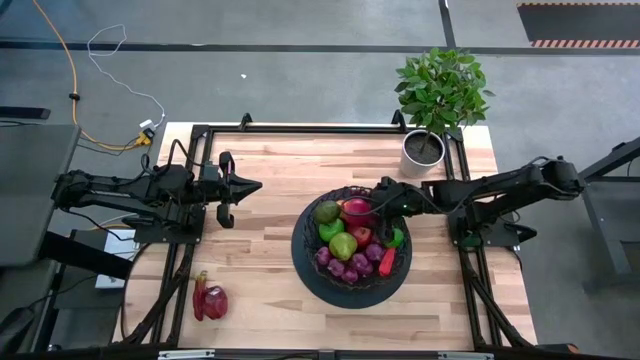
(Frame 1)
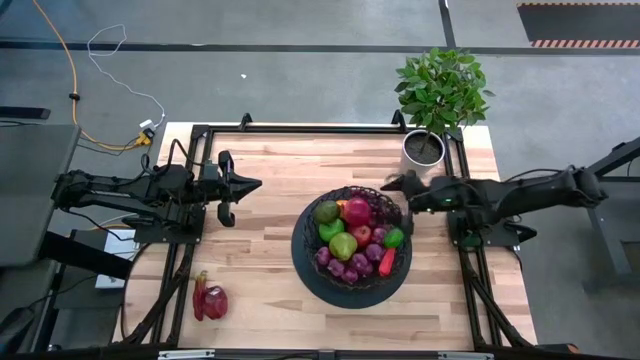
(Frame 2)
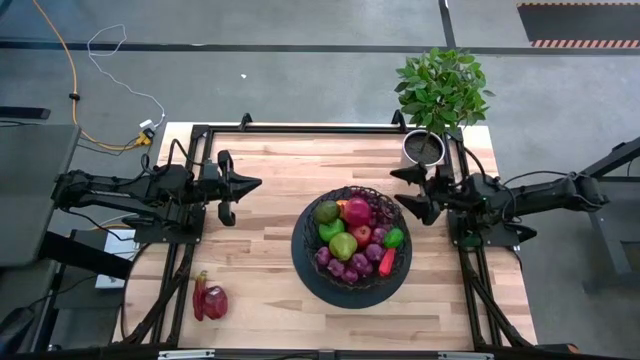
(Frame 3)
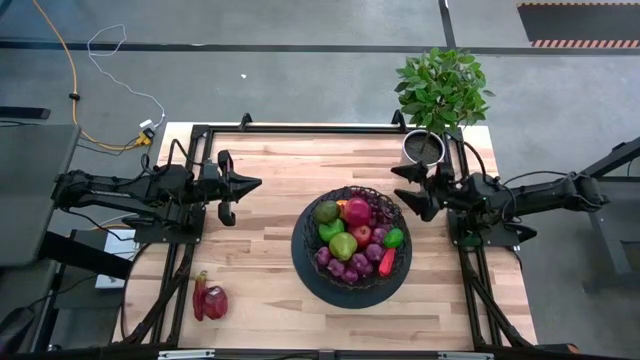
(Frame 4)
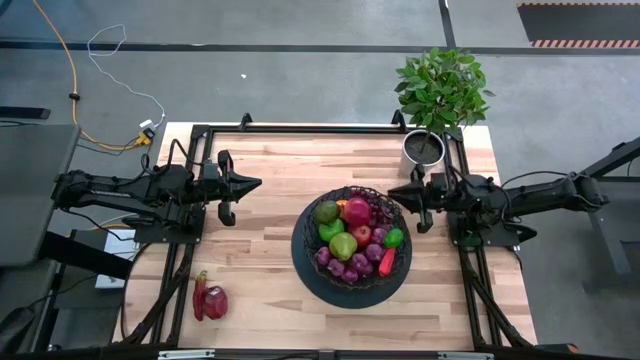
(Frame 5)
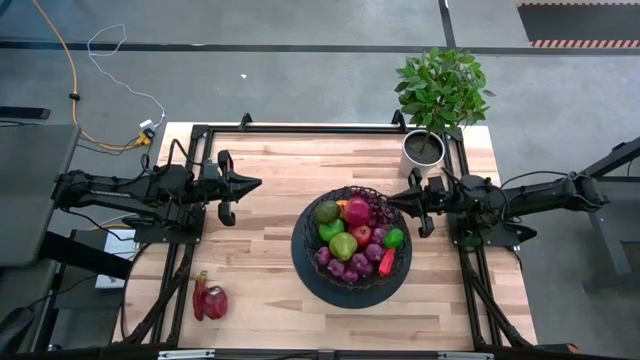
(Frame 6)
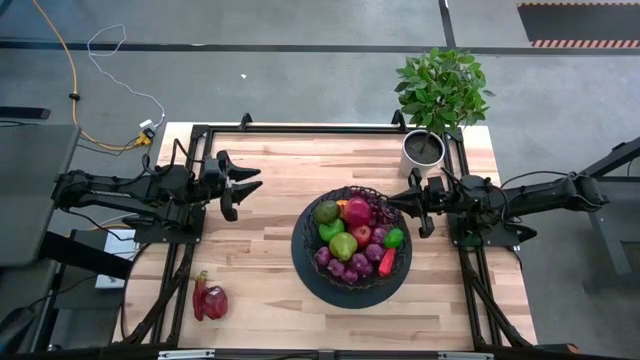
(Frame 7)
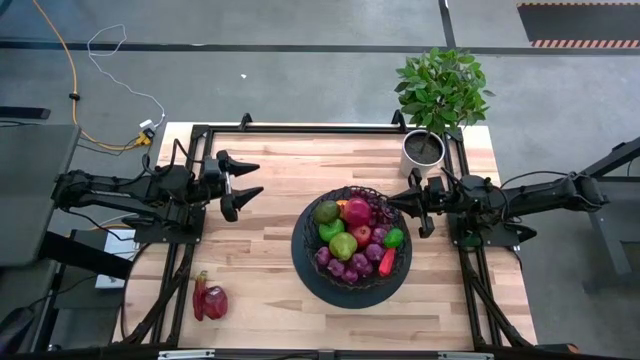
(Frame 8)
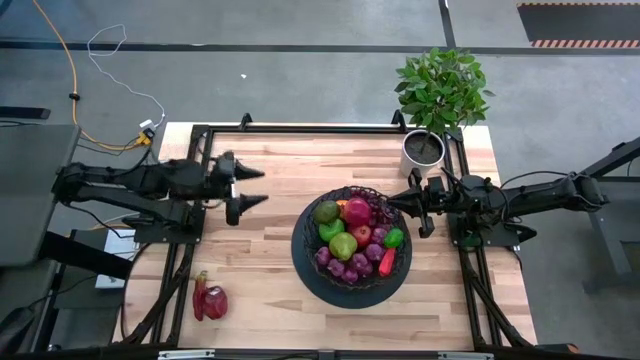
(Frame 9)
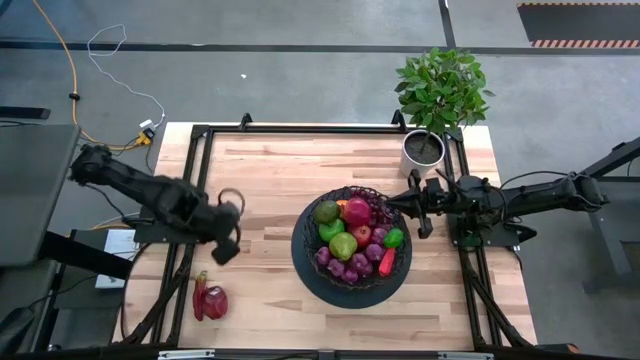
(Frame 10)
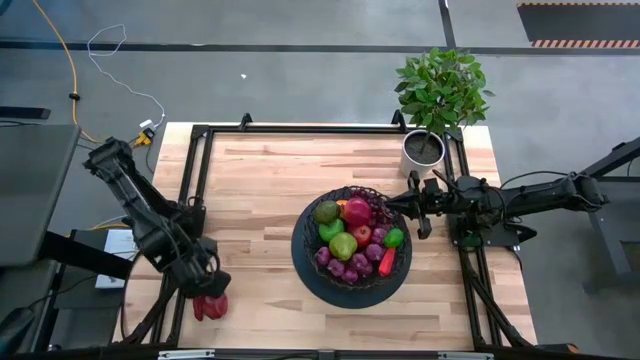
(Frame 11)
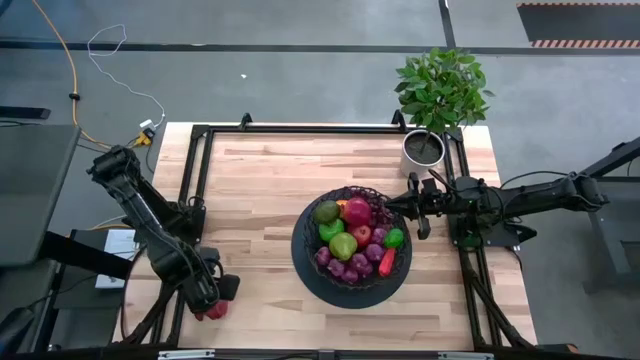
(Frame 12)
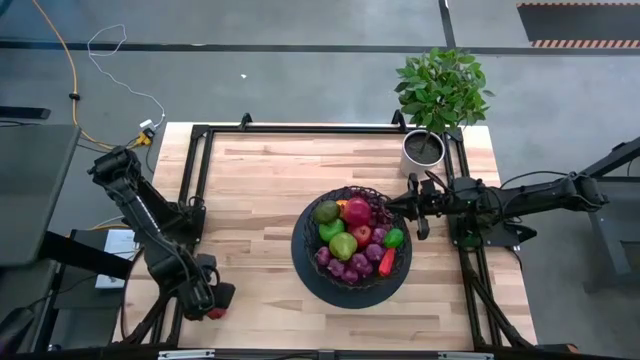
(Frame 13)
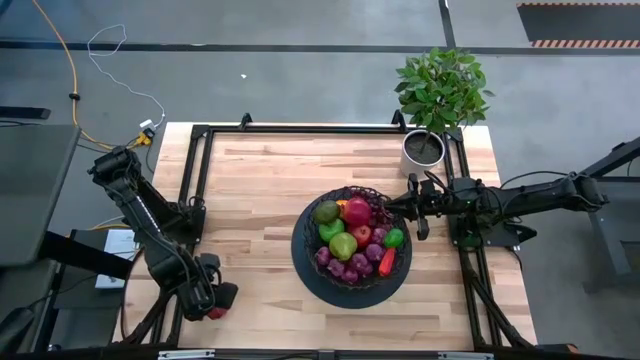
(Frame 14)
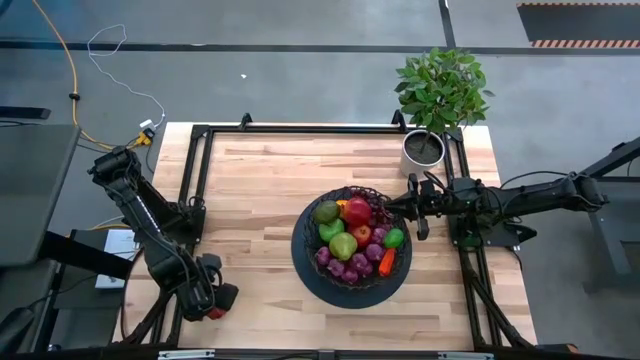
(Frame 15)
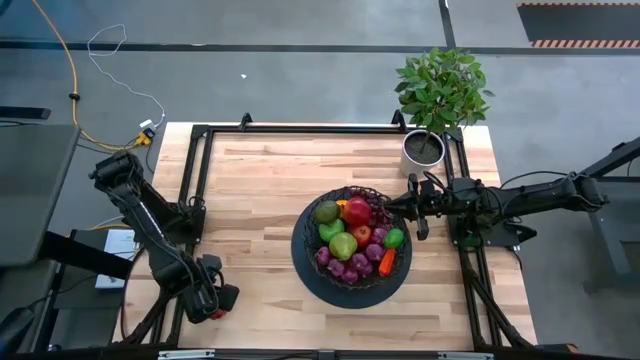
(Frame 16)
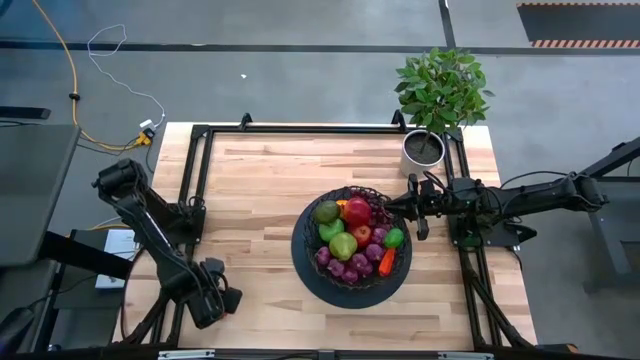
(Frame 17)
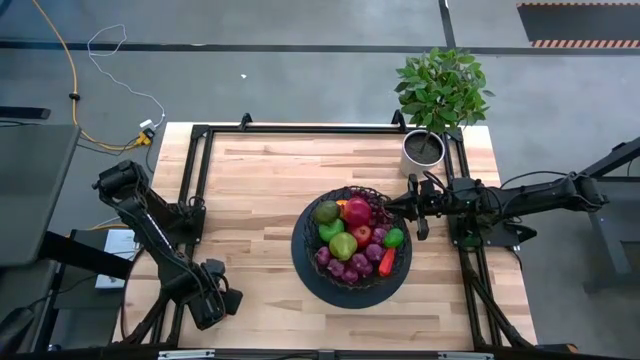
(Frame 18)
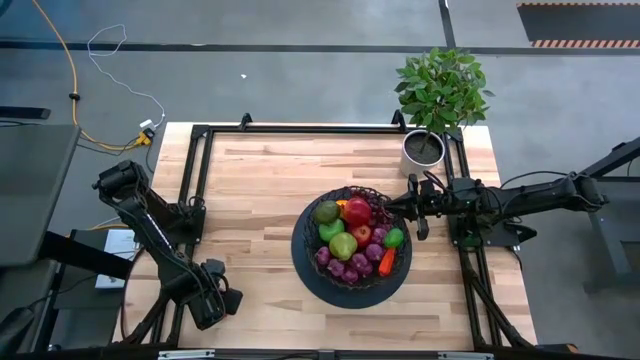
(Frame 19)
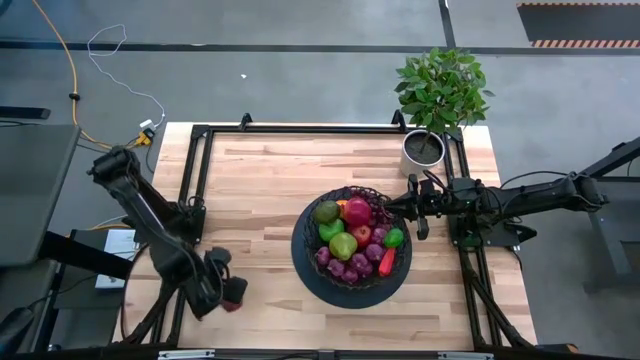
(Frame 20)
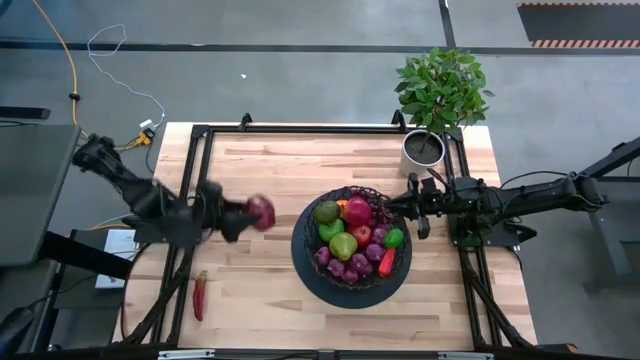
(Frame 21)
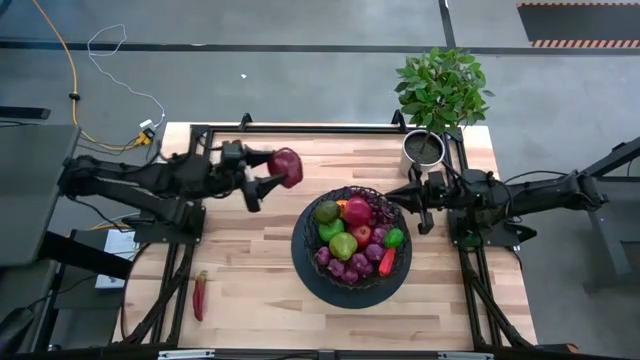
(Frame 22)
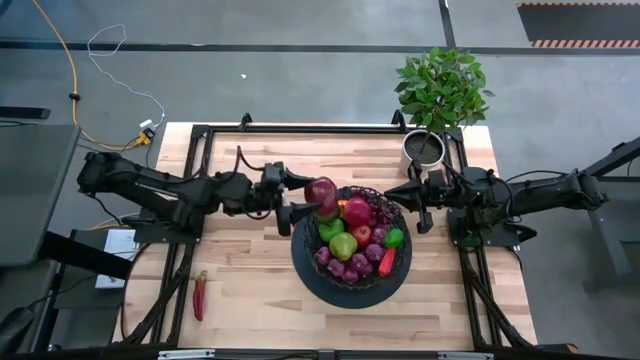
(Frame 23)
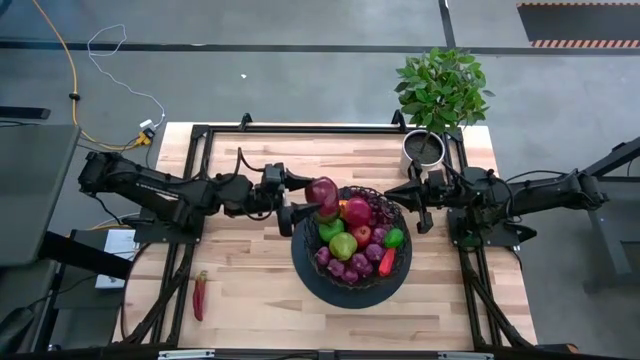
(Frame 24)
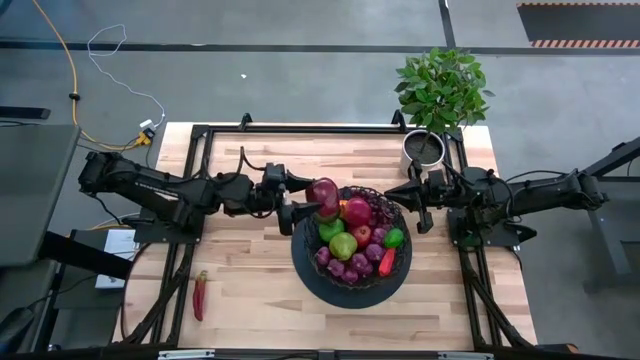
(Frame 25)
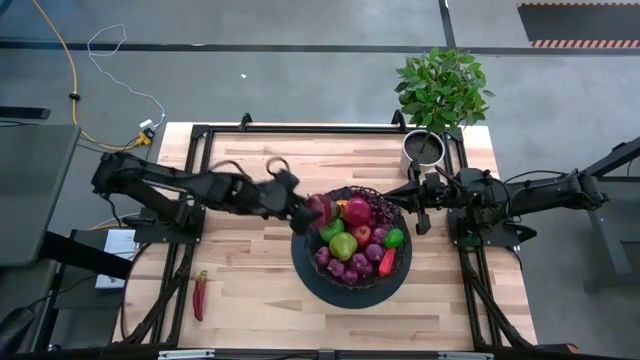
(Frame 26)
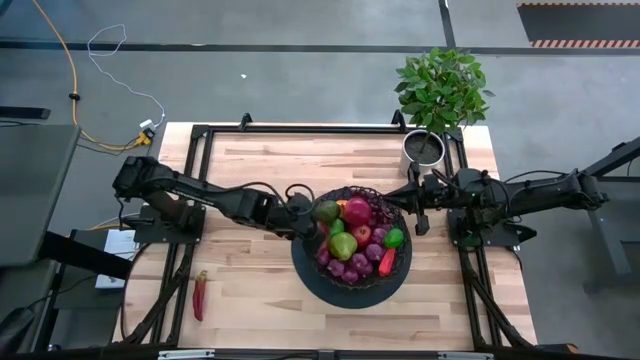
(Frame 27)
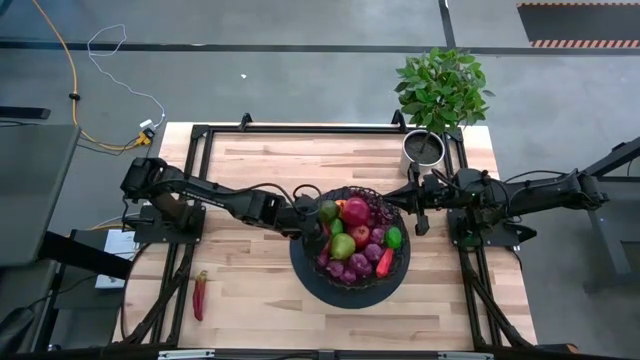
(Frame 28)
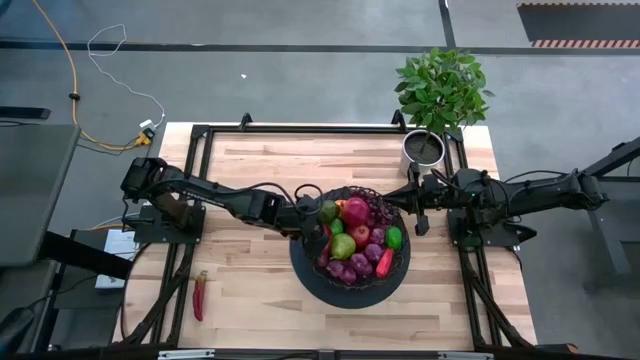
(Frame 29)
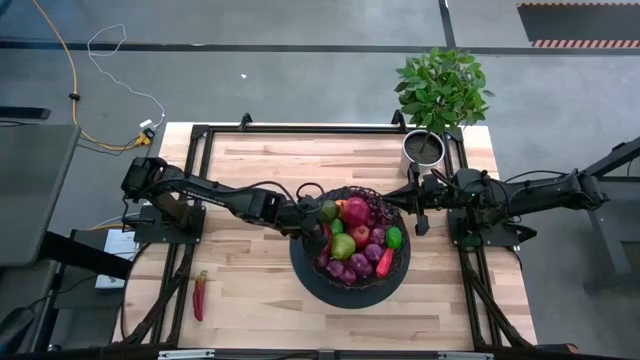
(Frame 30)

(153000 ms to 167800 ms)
Task: Build produce basket
Put the red apple into the basket

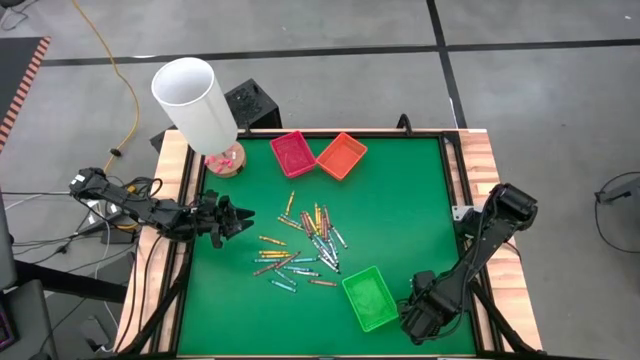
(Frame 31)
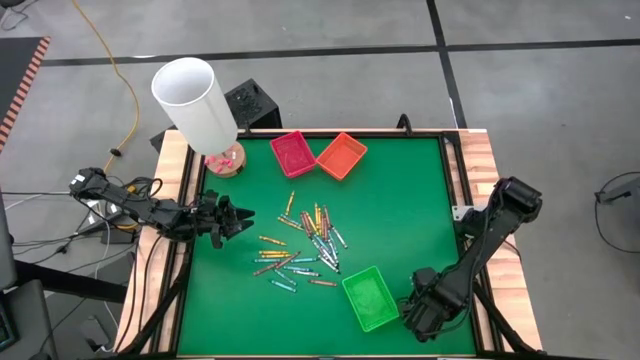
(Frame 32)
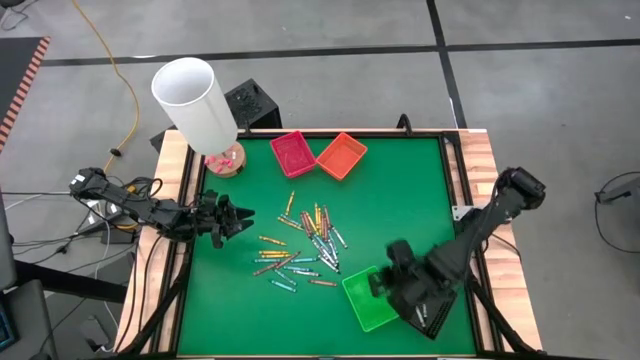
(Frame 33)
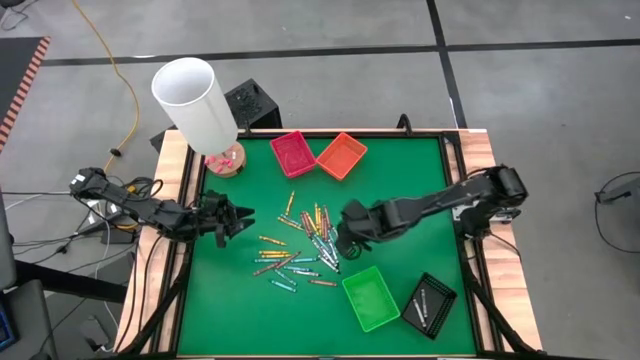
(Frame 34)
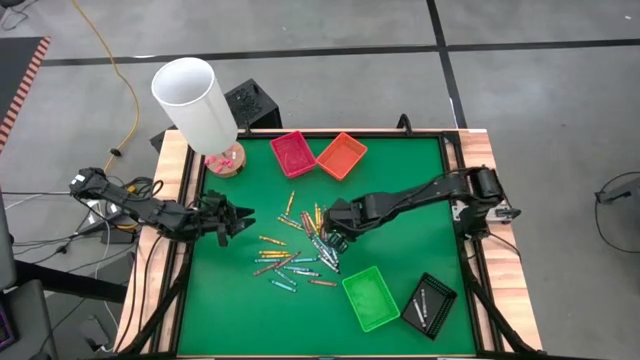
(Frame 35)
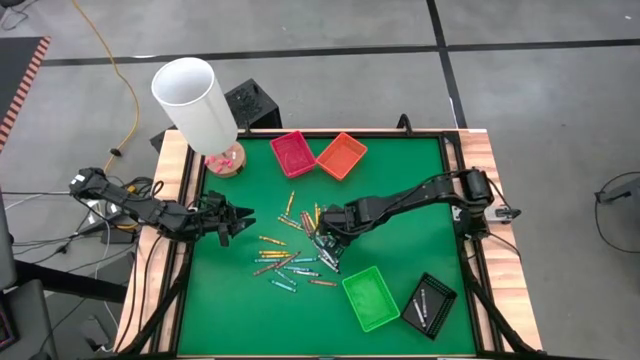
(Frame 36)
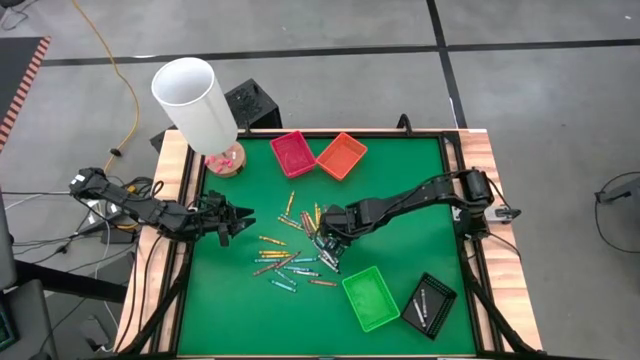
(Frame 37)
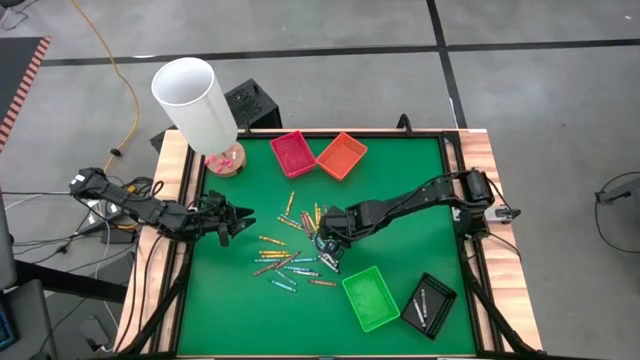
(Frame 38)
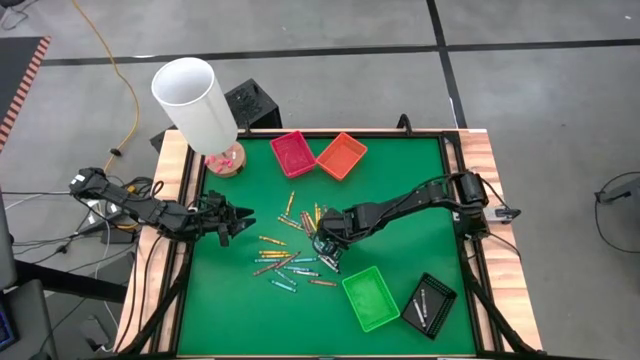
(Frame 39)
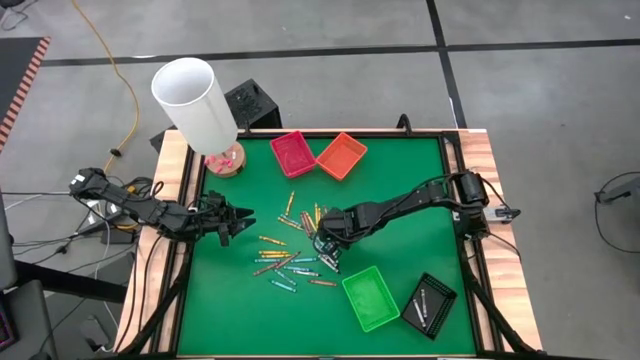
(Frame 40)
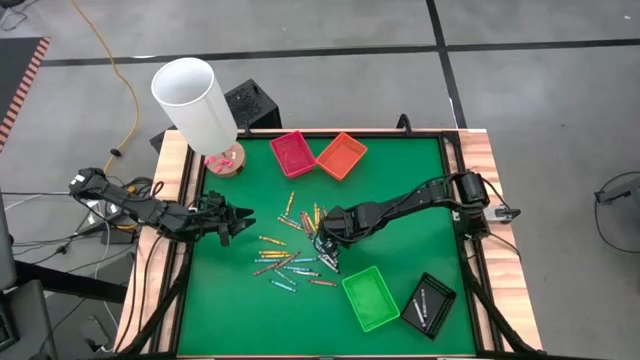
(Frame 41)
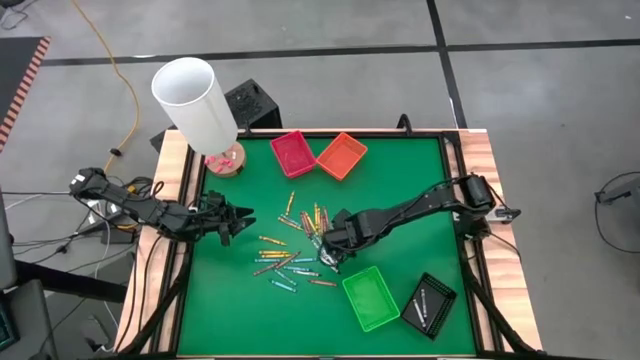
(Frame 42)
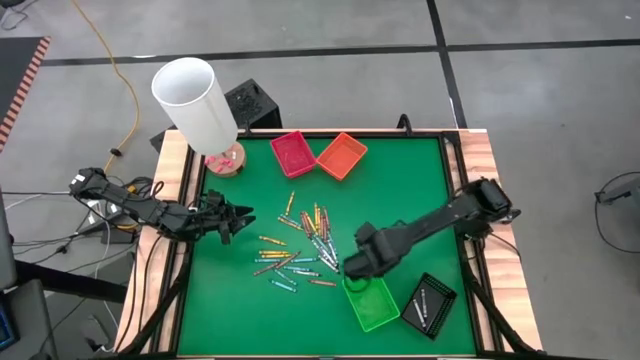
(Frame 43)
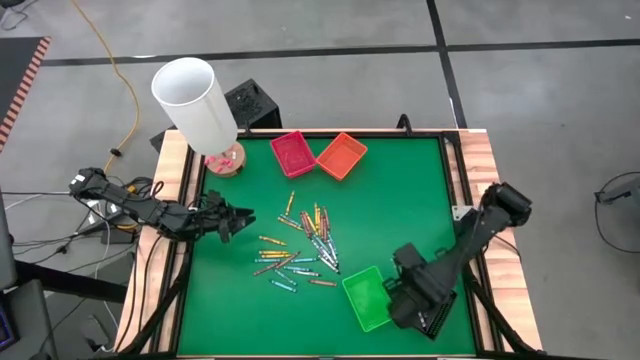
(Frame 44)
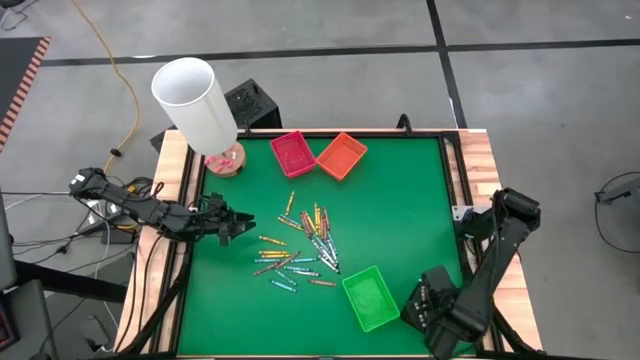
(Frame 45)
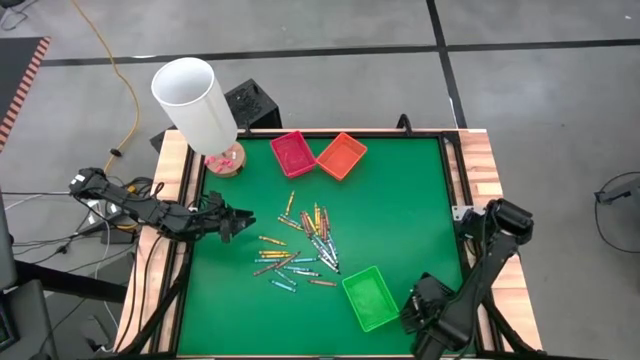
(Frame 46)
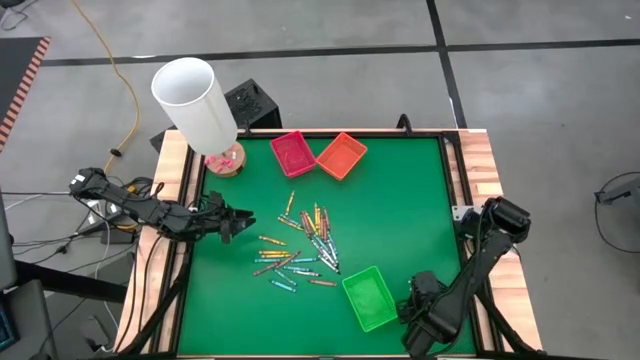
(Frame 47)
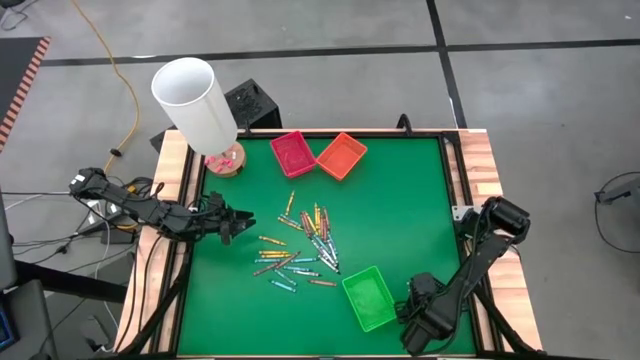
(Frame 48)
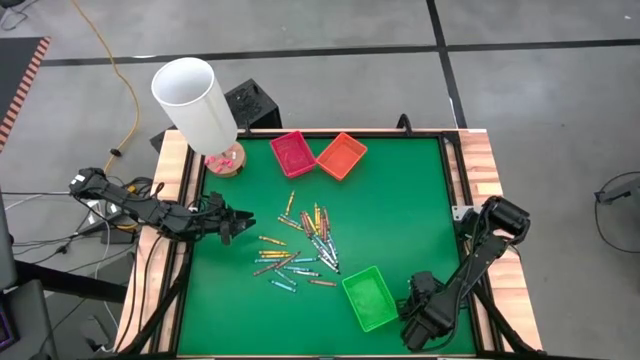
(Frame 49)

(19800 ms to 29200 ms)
Task: Sort crayons
Put the black crayon into the black bin
